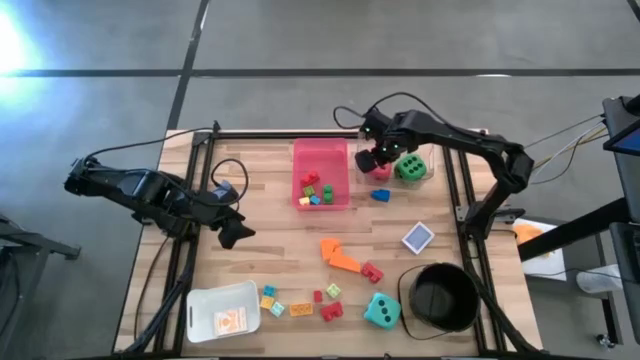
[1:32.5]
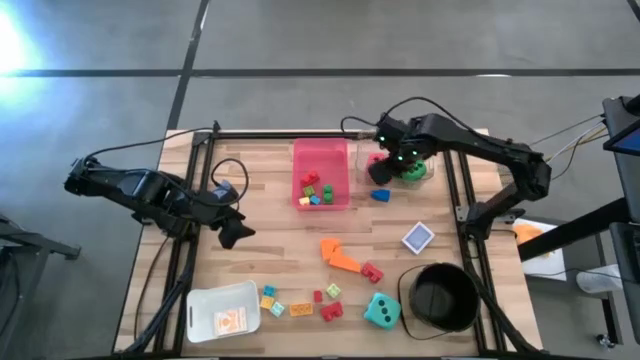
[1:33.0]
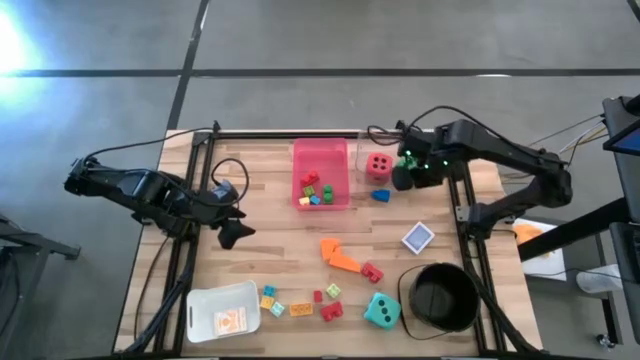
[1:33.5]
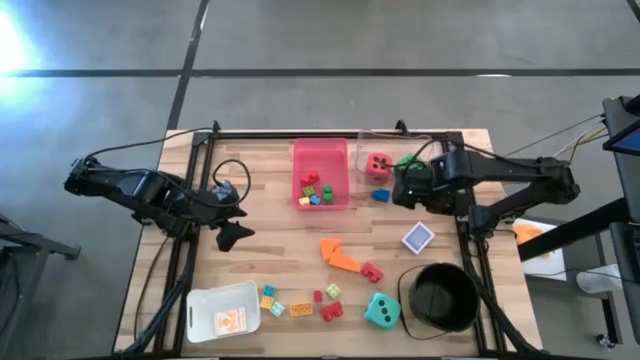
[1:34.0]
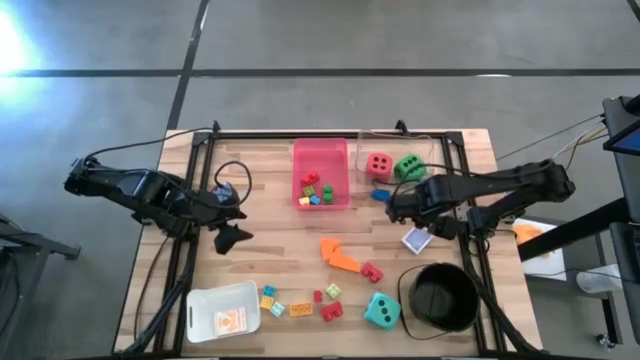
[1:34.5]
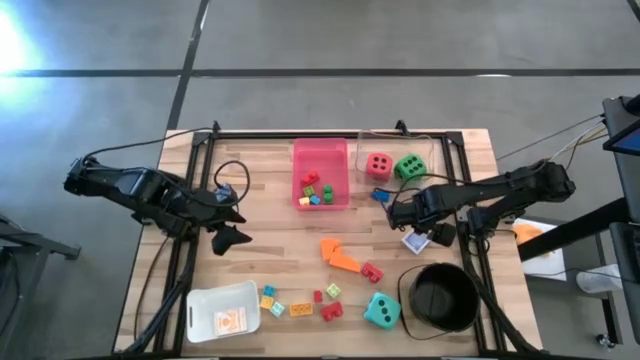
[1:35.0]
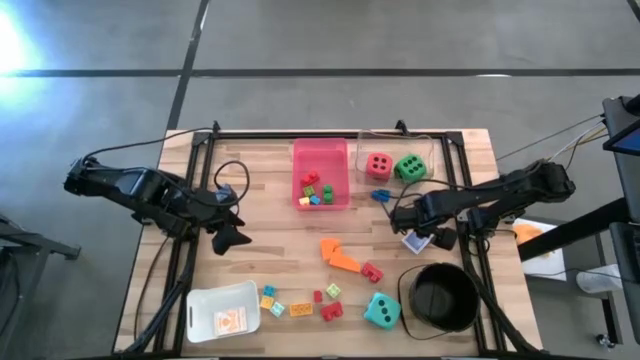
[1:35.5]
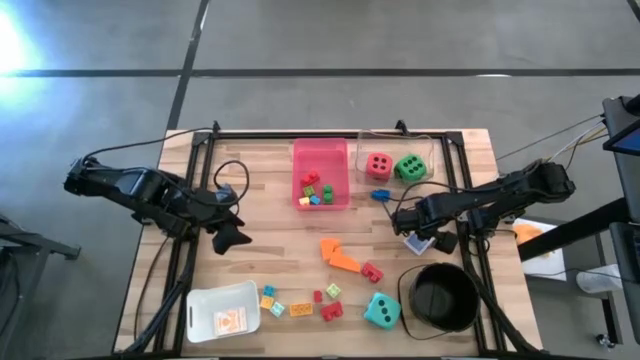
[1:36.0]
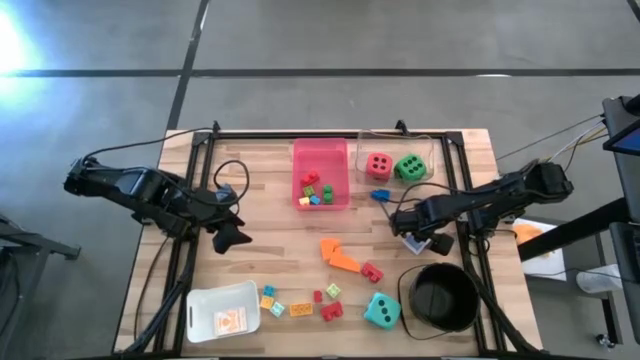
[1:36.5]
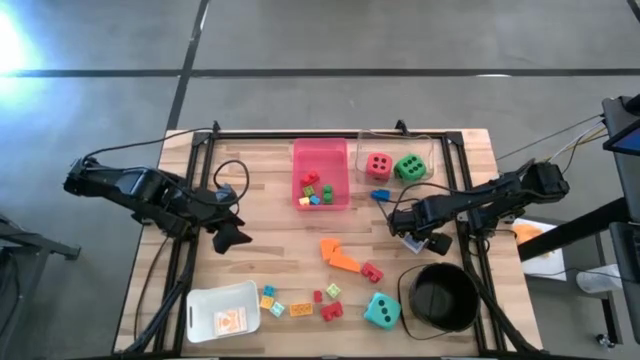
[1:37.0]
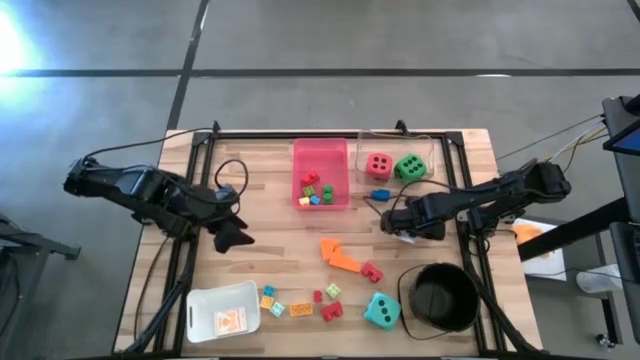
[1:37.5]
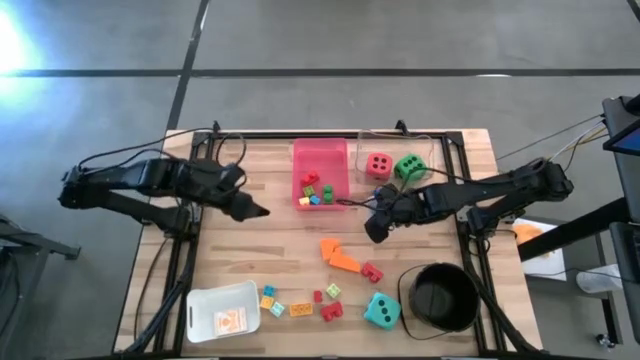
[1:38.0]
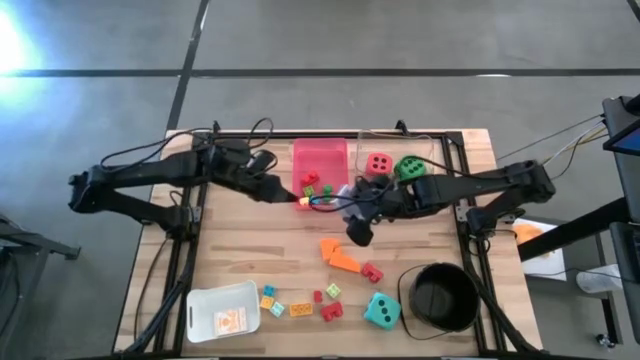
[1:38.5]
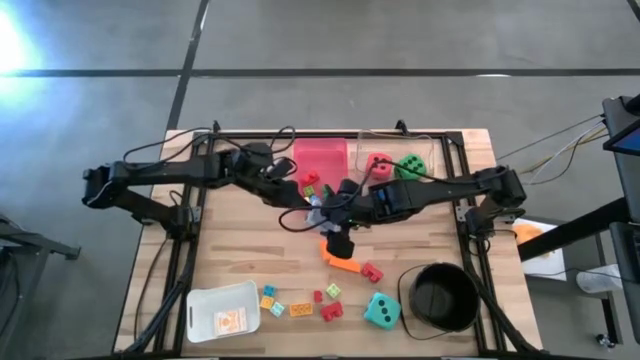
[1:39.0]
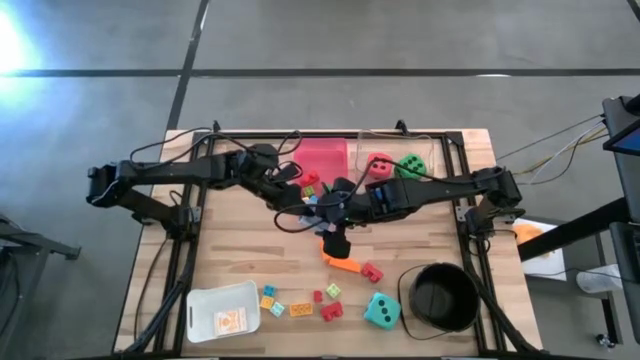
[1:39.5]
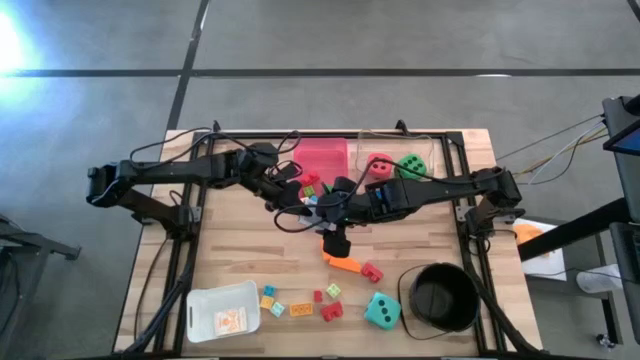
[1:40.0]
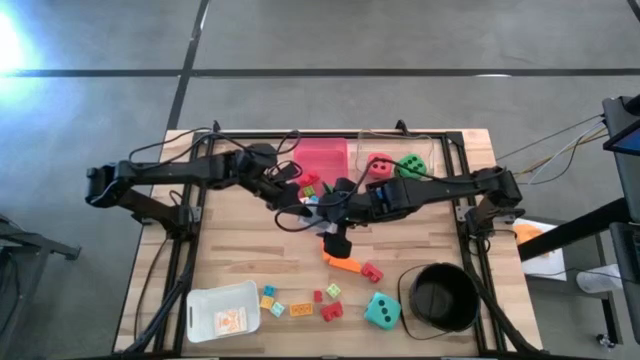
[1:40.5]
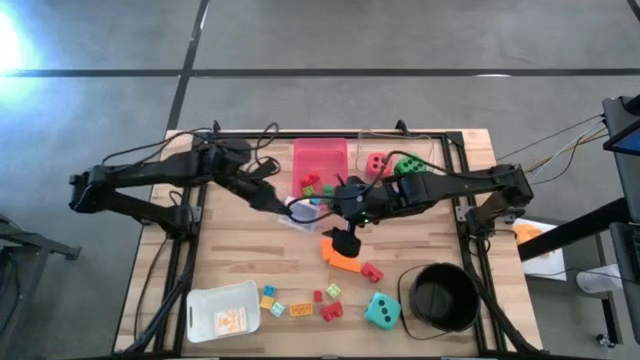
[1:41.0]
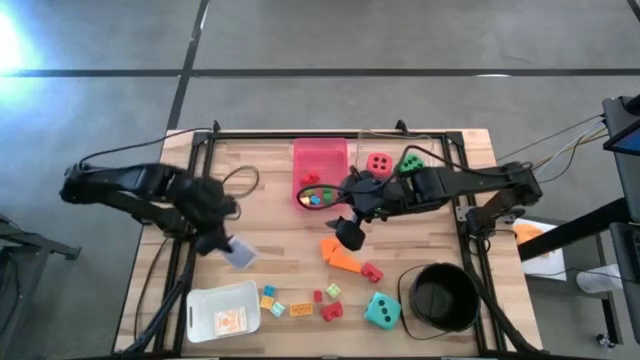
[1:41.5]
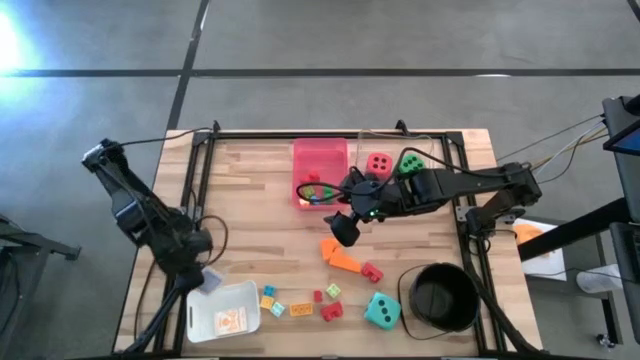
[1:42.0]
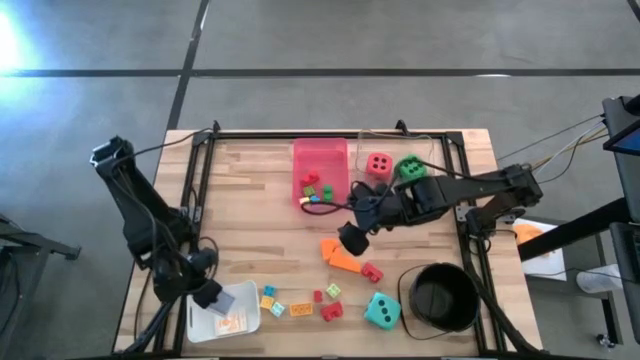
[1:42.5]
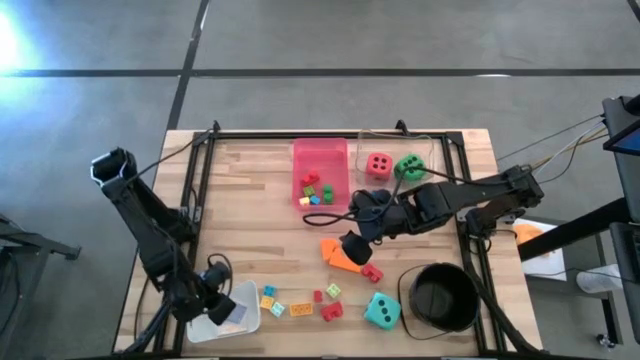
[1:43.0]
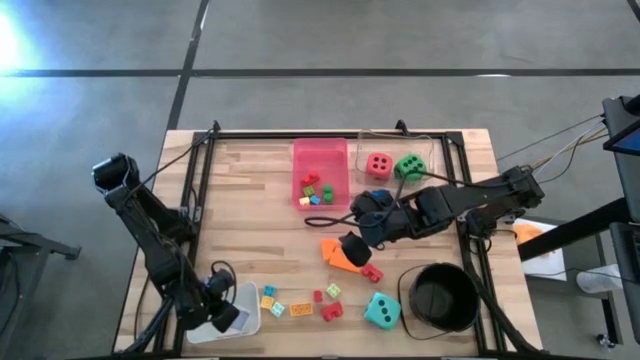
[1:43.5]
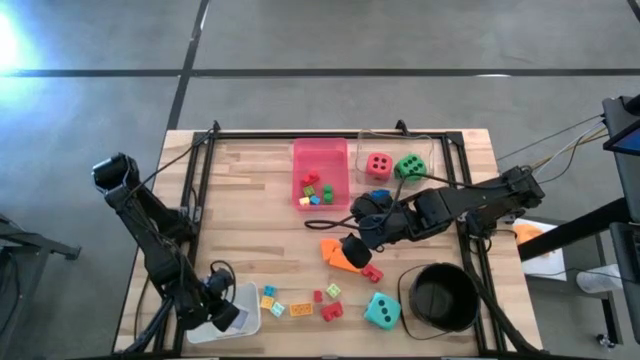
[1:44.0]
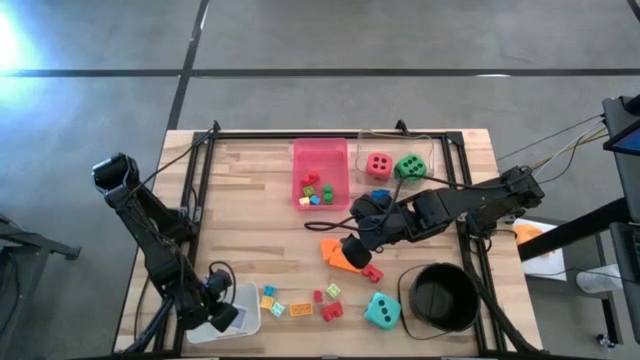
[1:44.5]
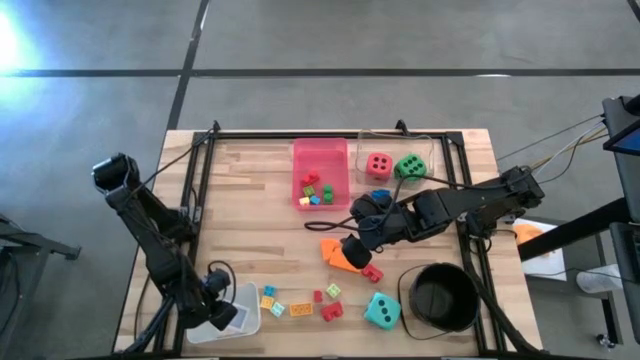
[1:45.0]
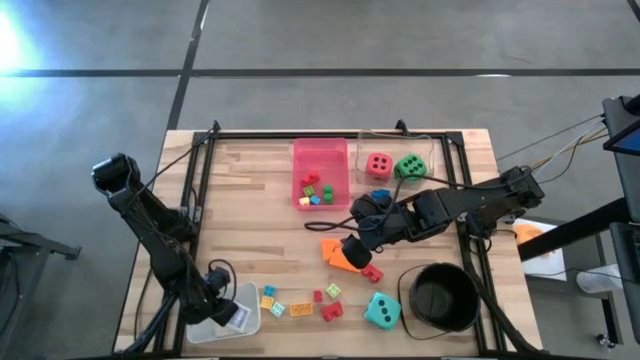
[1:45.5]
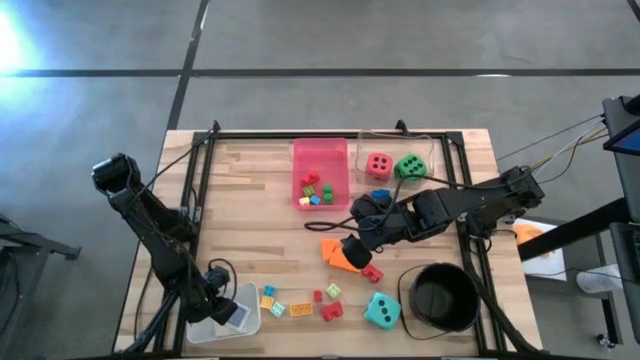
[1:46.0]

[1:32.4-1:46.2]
Task: Pick & Place Toys
Put the blue deck of cards into the white bin

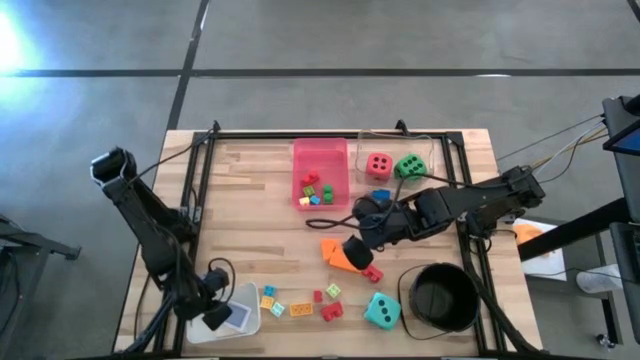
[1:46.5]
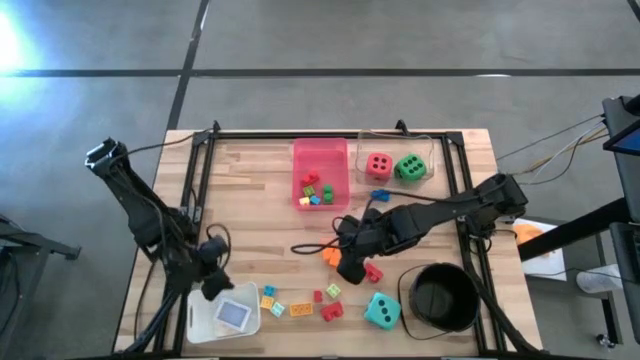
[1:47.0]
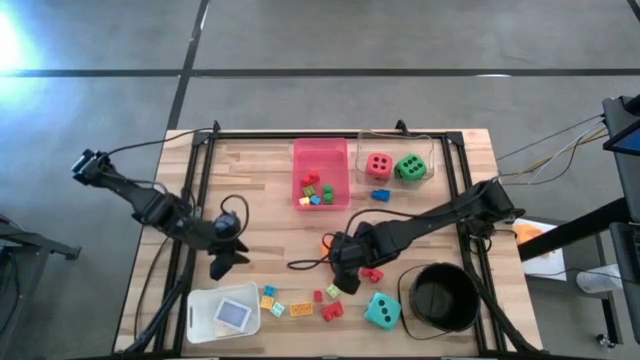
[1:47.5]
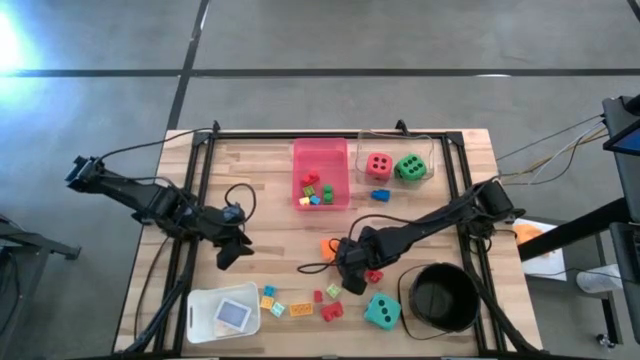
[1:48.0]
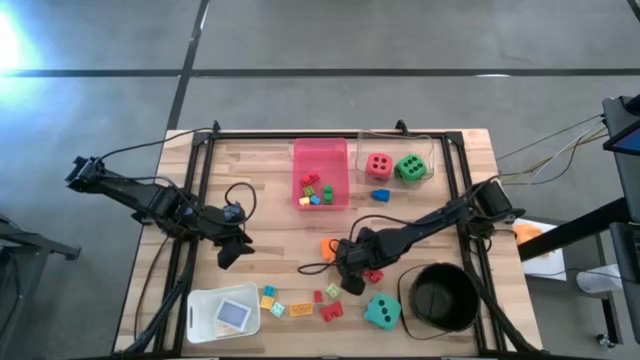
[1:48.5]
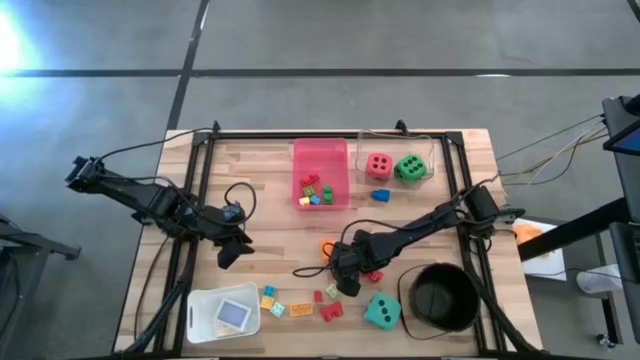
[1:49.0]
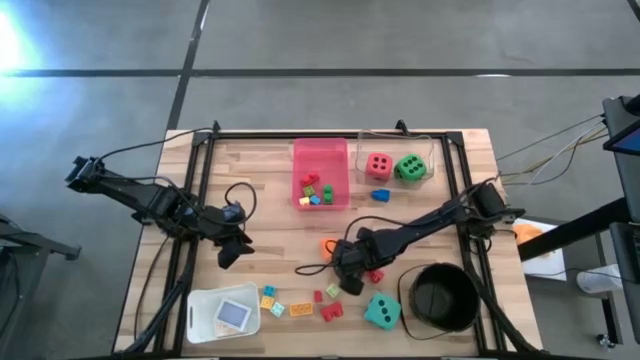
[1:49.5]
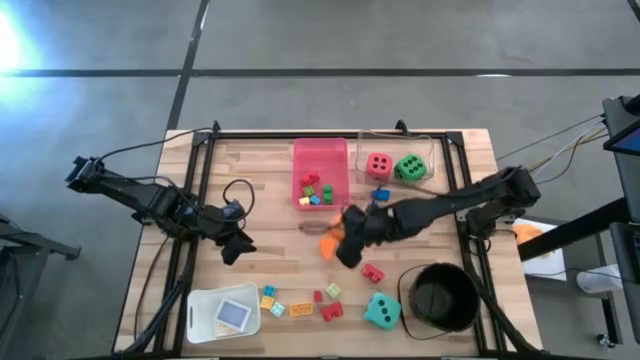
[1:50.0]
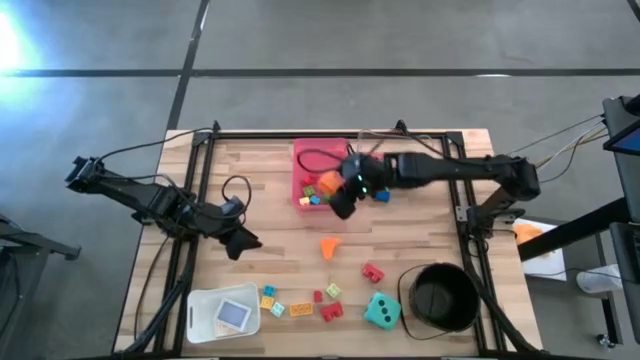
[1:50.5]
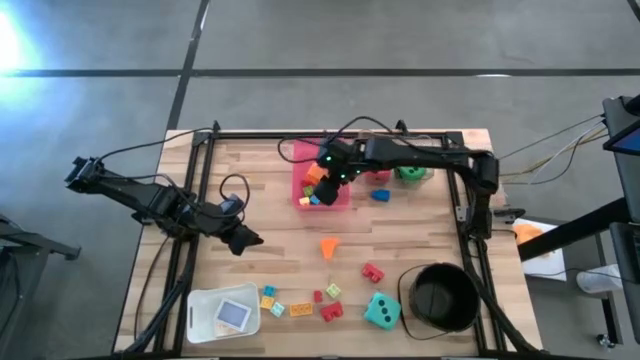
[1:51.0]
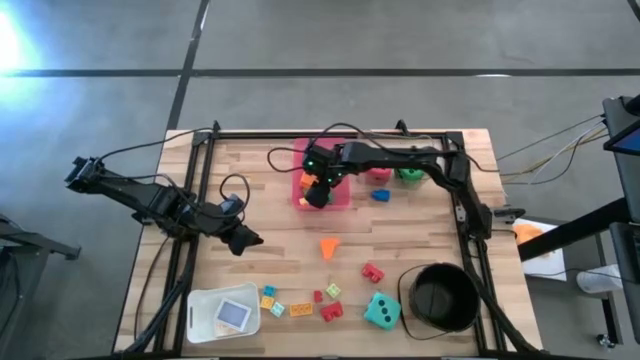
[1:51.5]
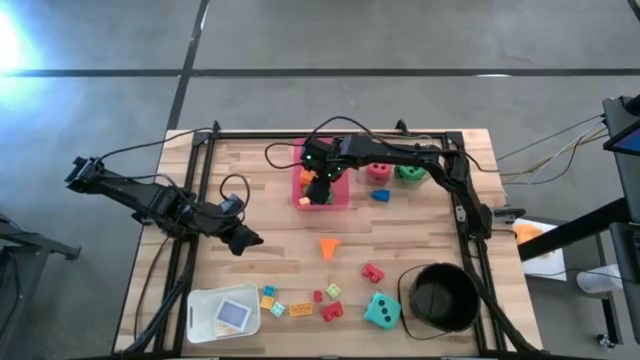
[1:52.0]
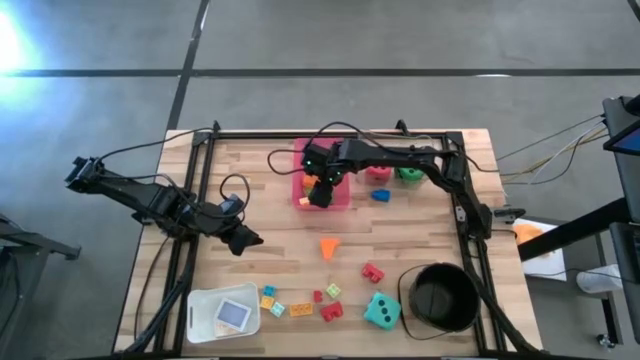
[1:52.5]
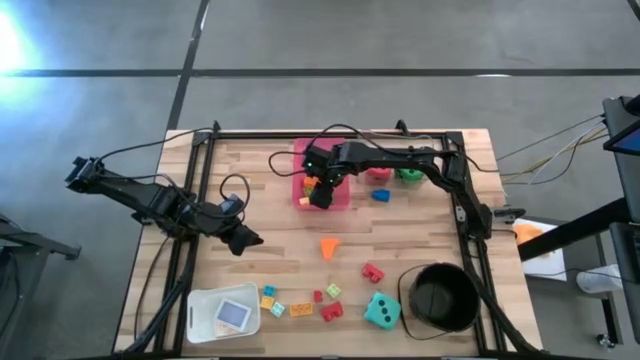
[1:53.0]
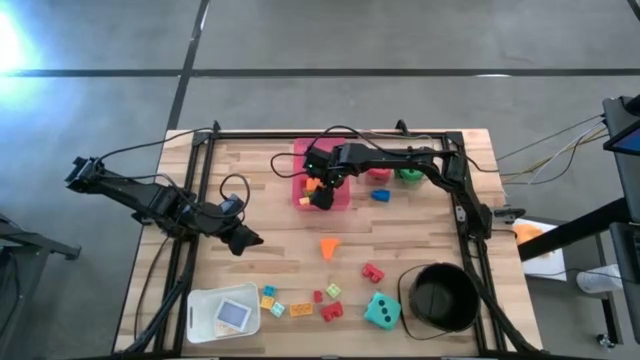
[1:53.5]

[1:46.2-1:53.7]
Put the orange game piece into the red bin

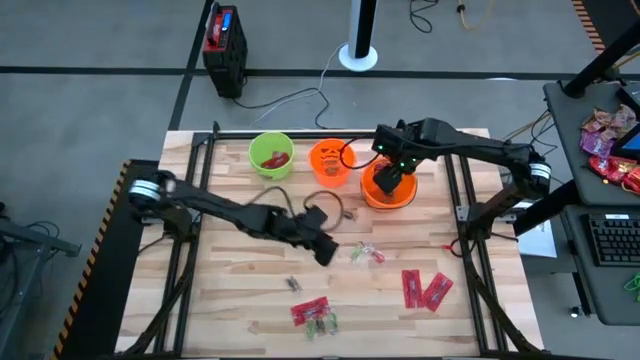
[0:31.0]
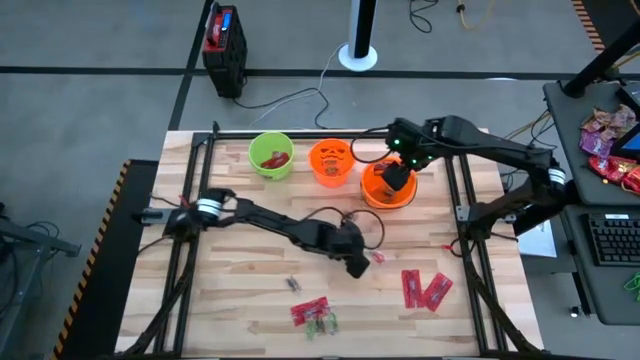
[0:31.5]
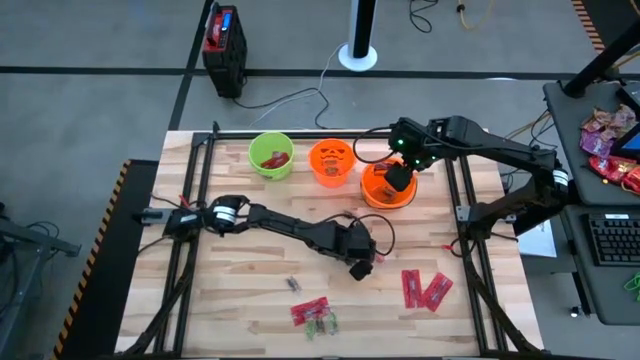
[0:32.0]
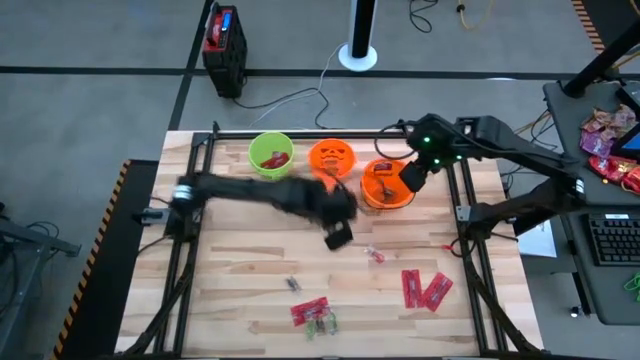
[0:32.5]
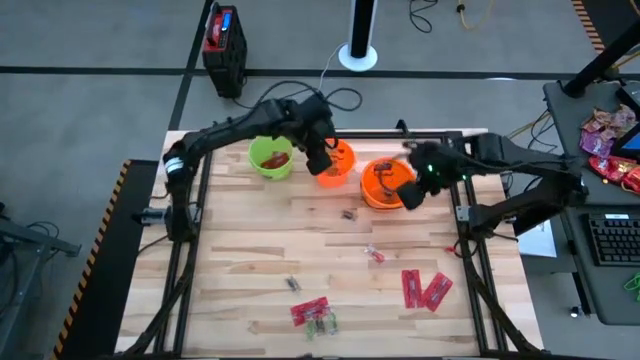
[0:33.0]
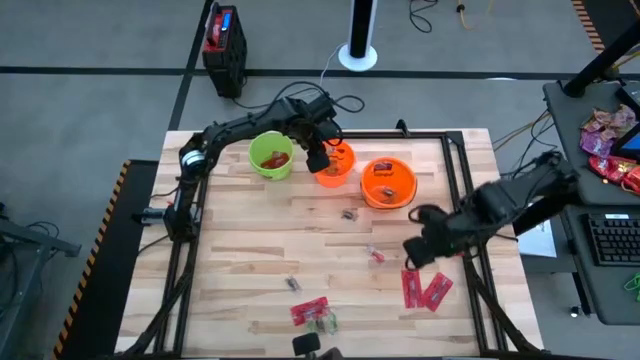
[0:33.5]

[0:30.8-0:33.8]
Task: Sort candy by brand, put in halloween buckets
Put the green gummy into the left orange bucket
